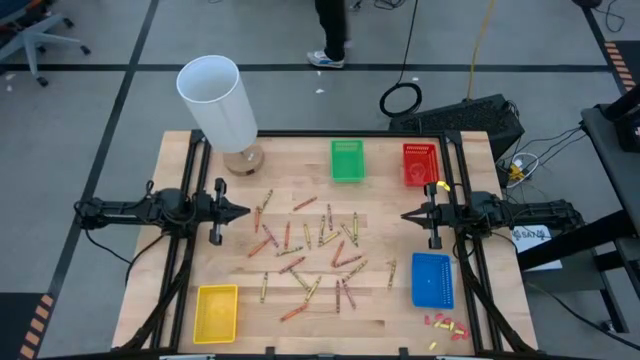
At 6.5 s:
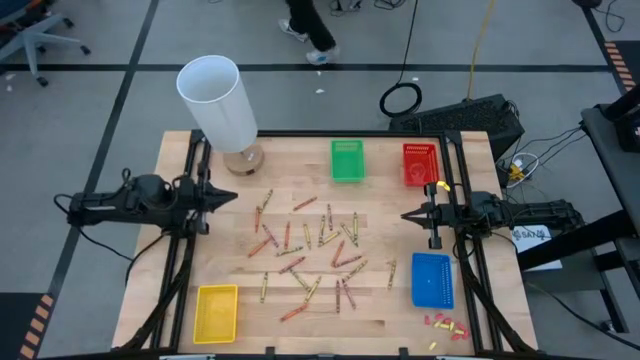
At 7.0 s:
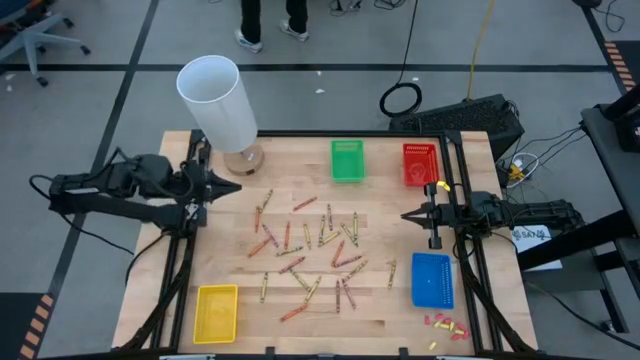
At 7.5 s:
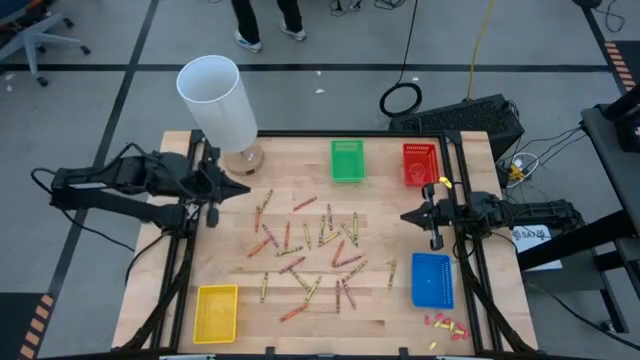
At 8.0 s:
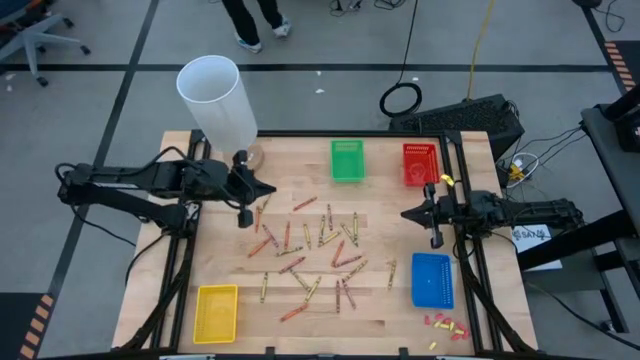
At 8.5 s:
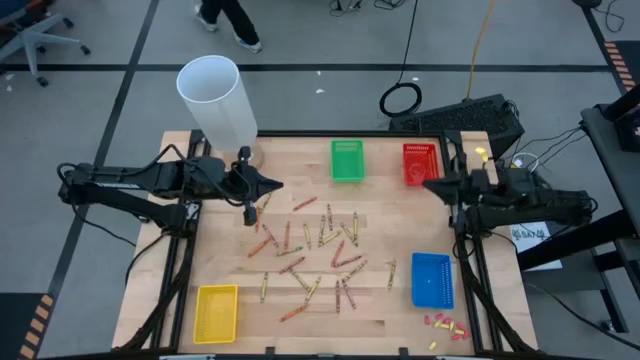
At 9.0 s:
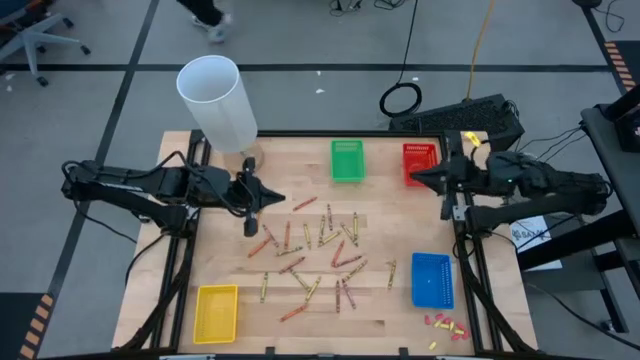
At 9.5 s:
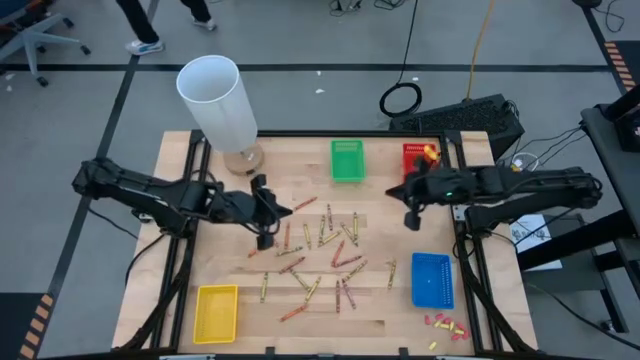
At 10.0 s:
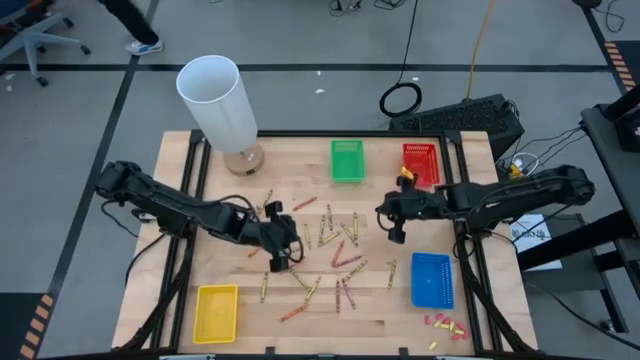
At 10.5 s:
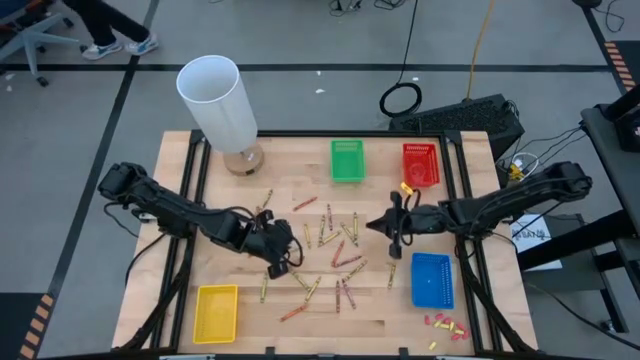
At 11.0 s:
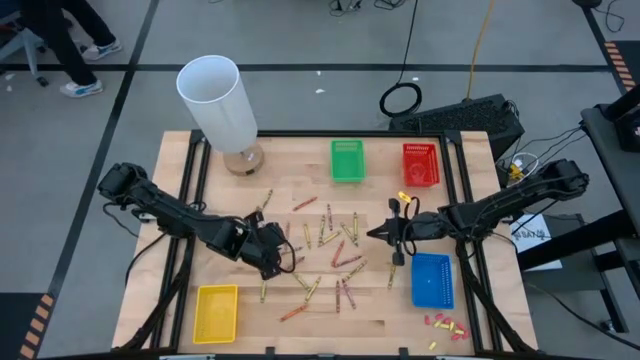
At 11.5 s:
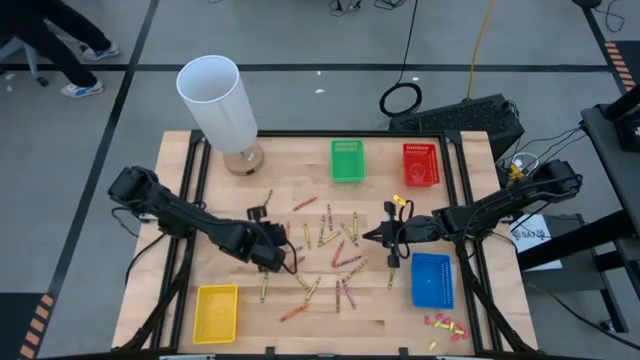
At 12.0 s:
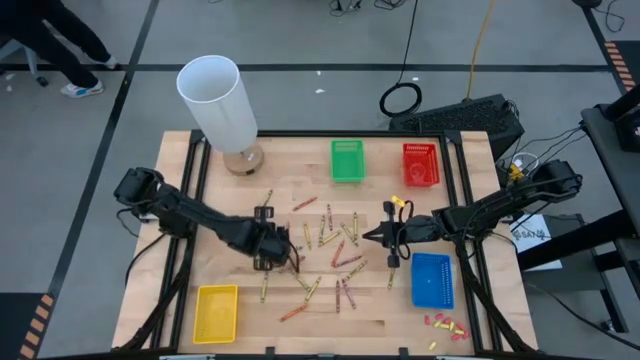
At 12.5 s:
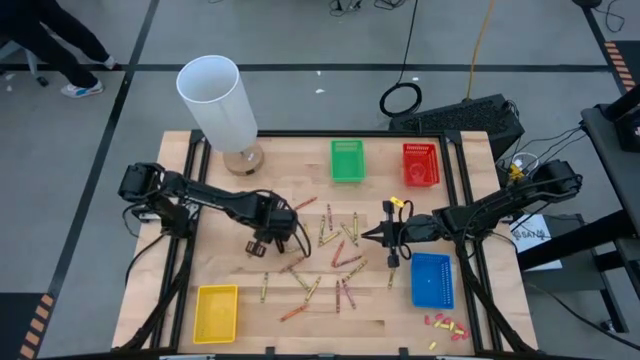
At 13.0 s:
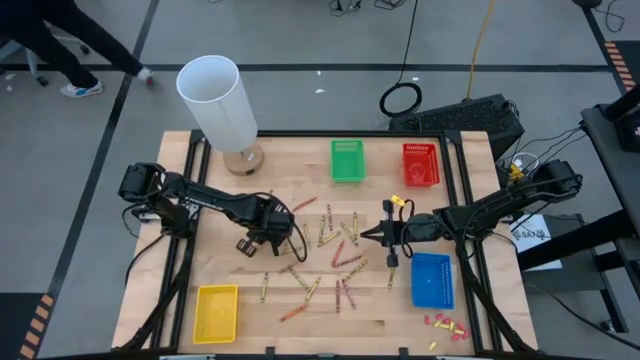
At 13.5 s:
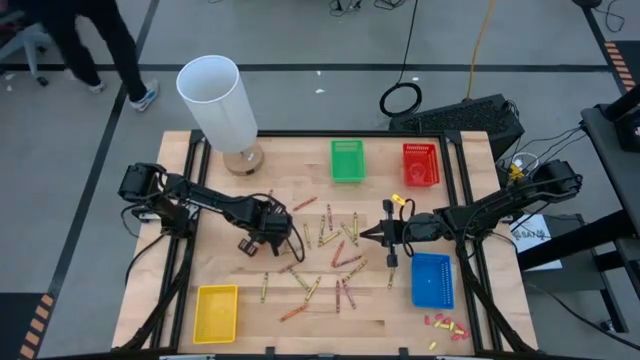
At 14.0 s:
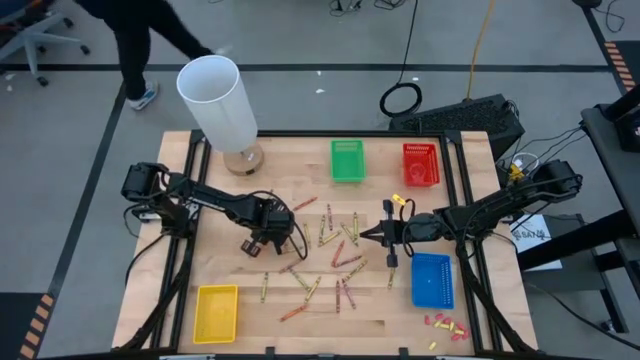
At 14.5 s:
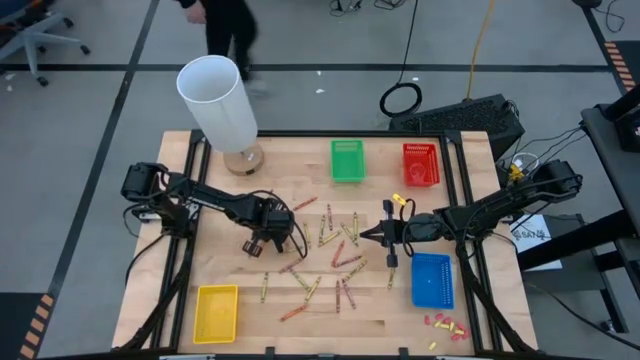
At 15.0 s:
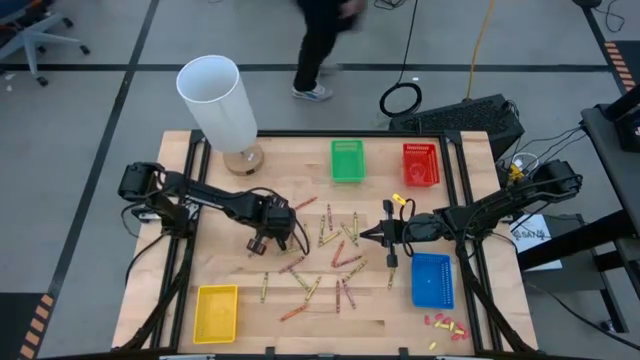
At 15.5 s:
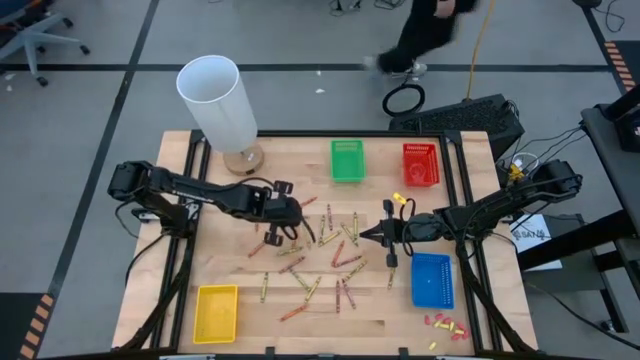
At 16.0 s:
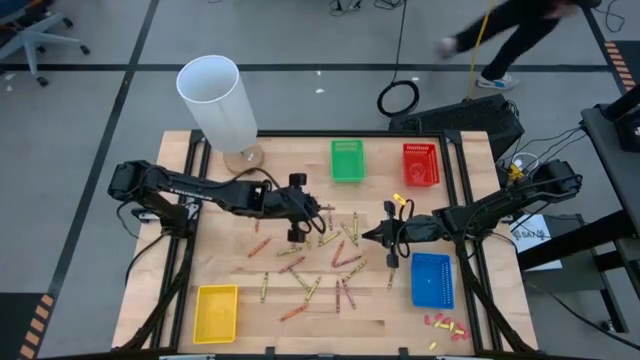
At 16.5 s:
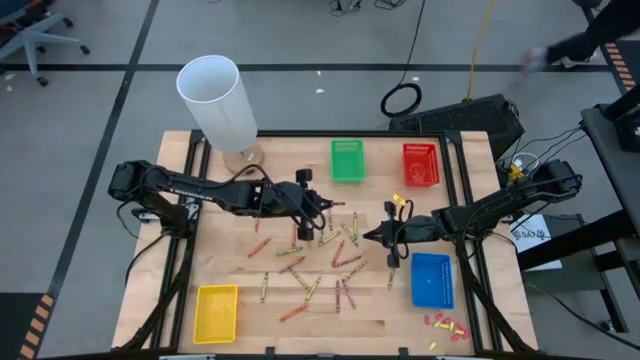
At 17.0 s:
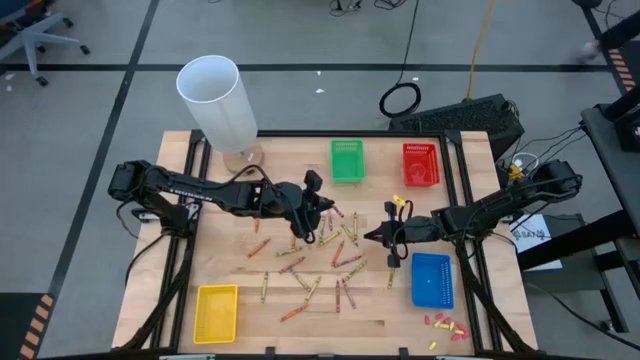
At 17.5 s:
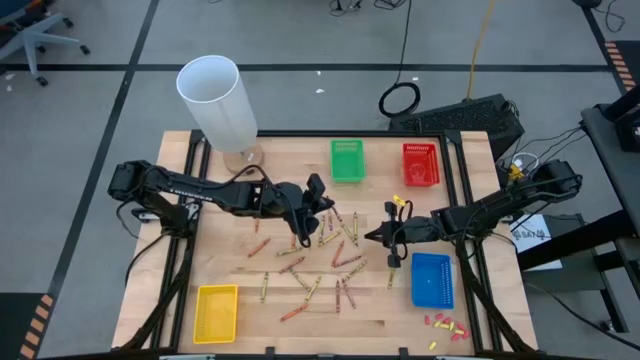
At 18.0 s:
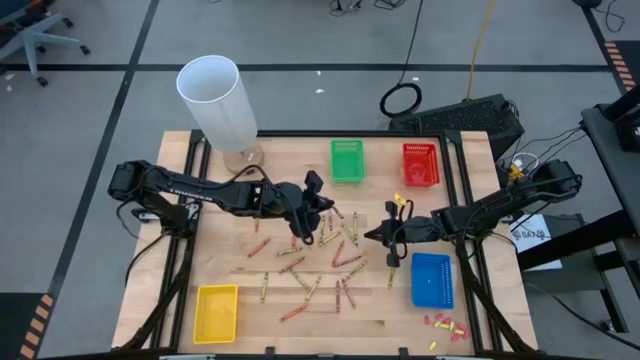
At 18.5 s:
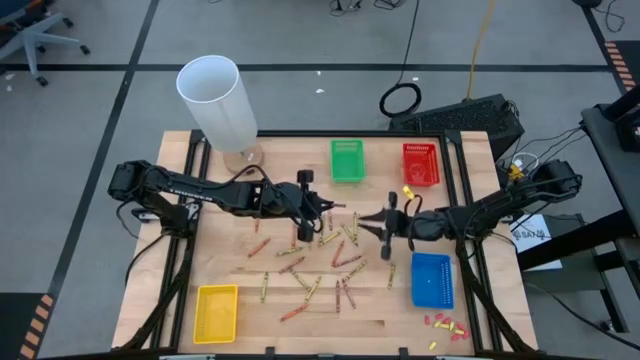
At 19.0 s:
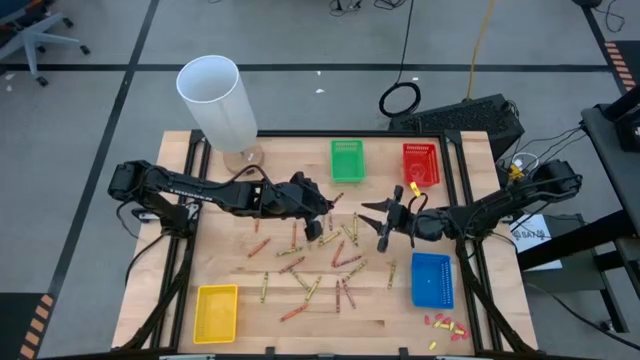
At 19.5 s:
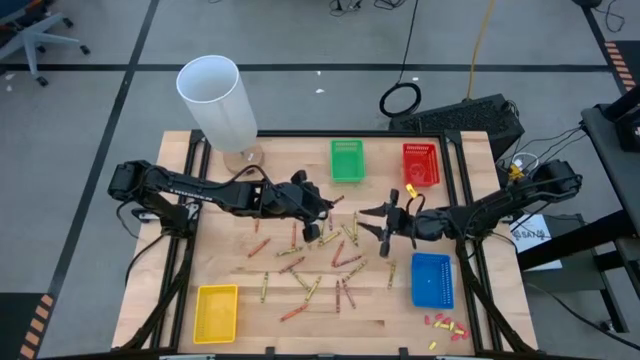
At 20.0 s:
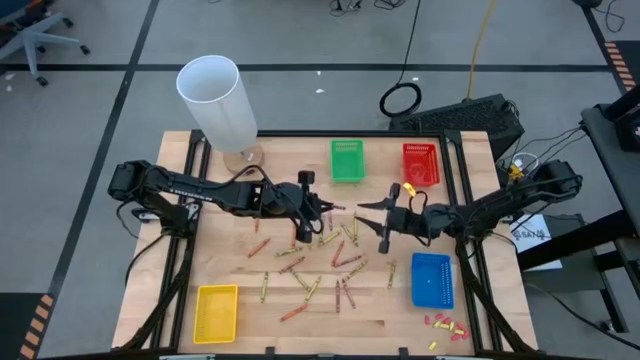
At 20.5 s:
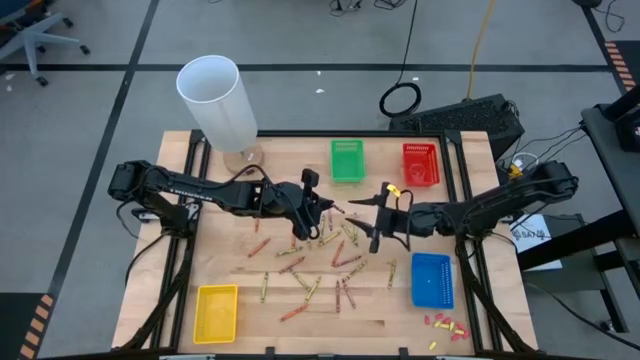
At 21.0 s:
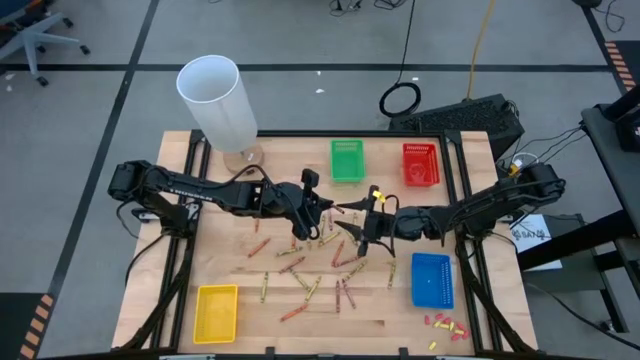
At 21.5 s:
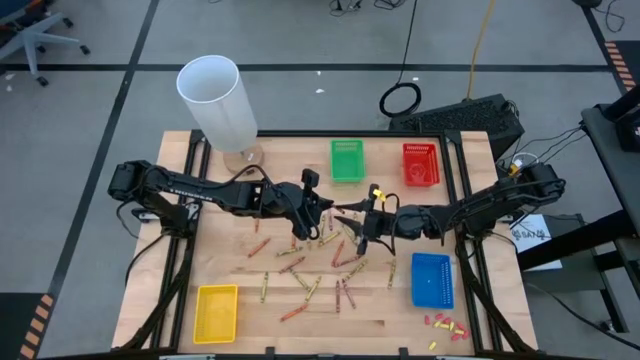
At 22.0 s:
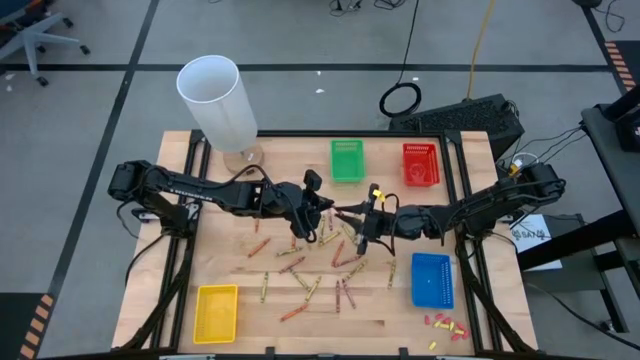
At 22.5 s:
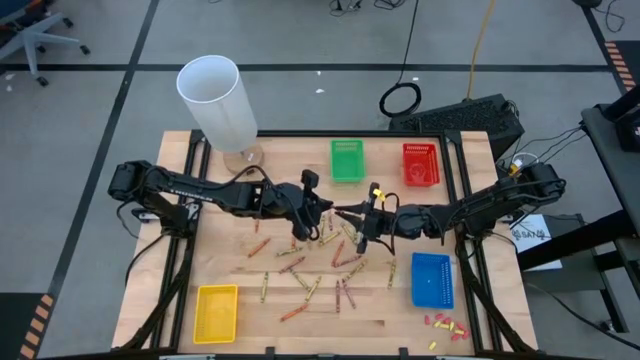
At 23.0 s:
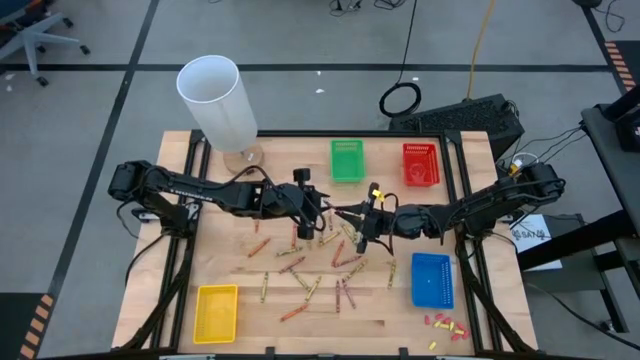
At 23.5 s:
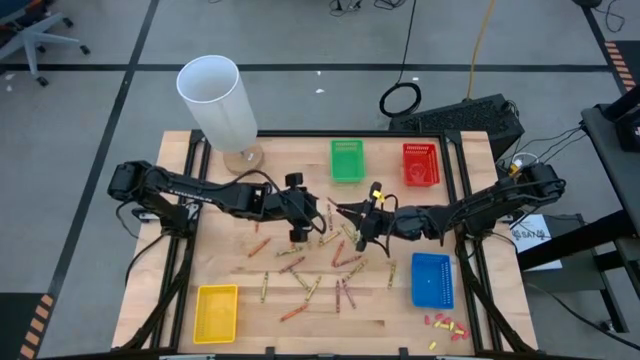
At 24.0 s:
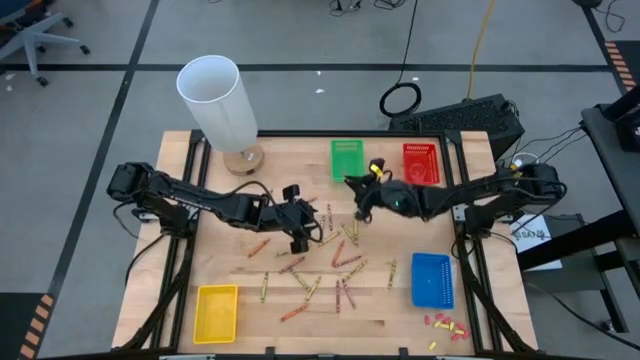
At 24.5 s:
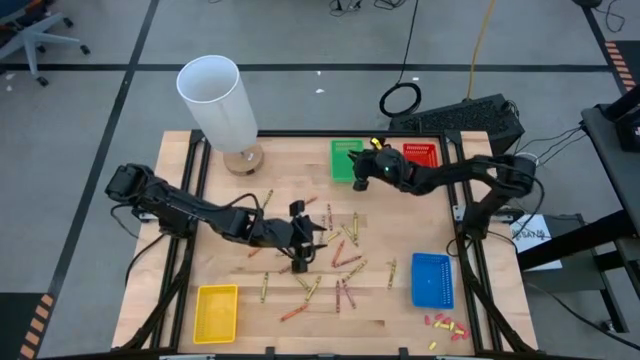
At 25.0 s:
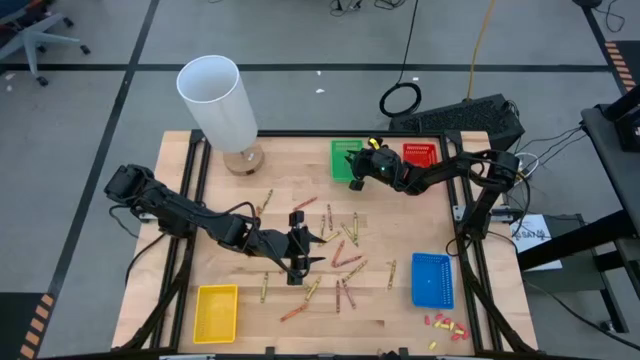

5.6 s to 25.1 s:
Task: Sort crayons
Put the red crayon into the green bin
